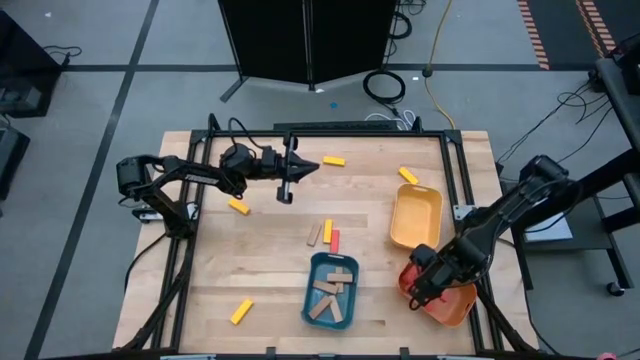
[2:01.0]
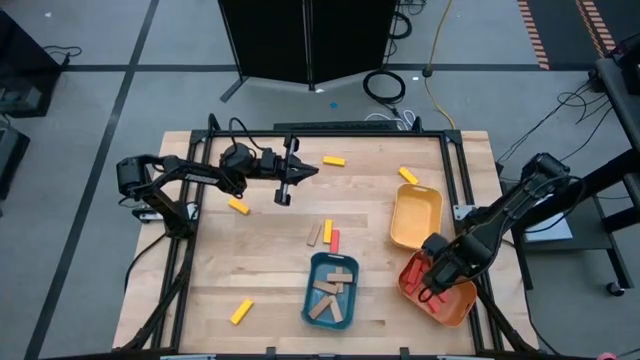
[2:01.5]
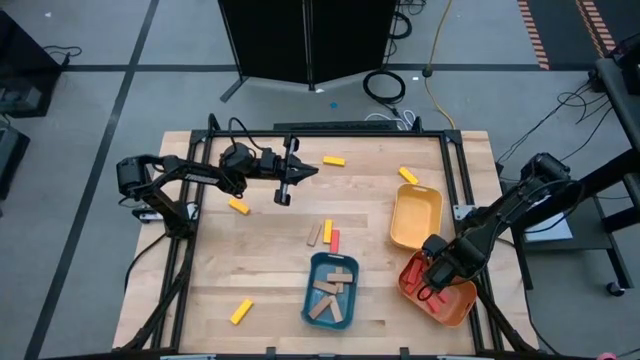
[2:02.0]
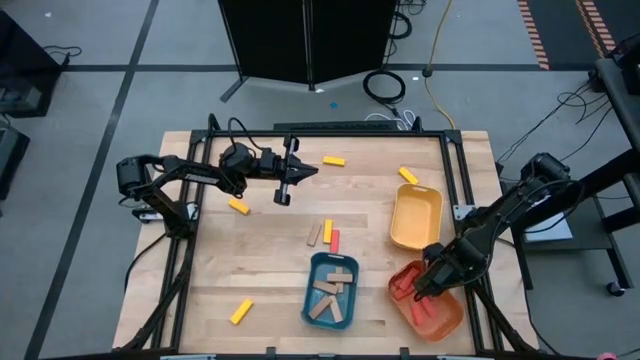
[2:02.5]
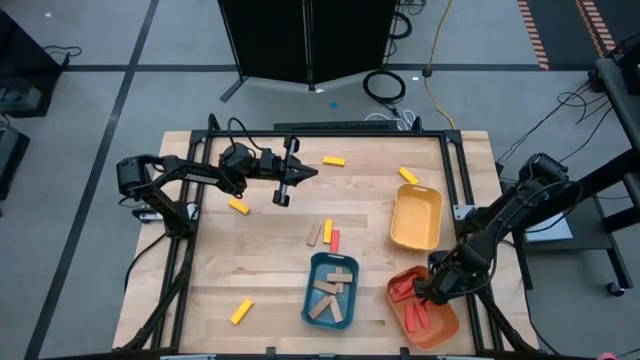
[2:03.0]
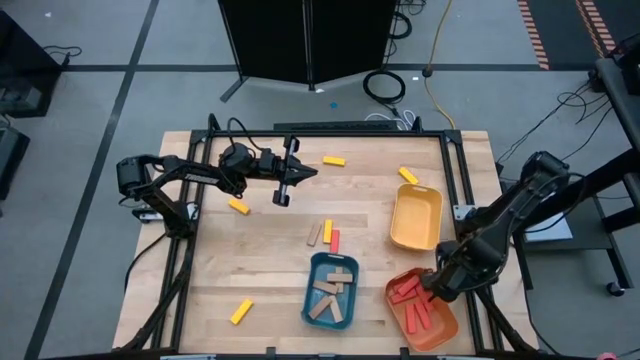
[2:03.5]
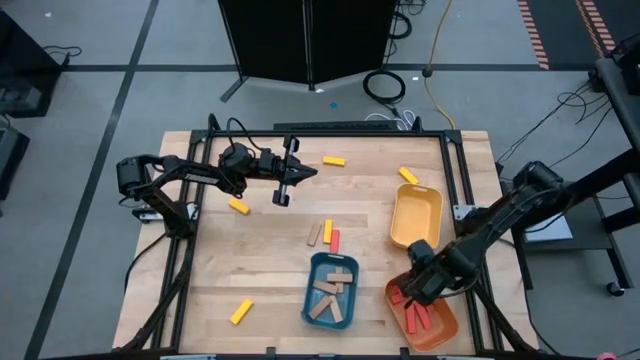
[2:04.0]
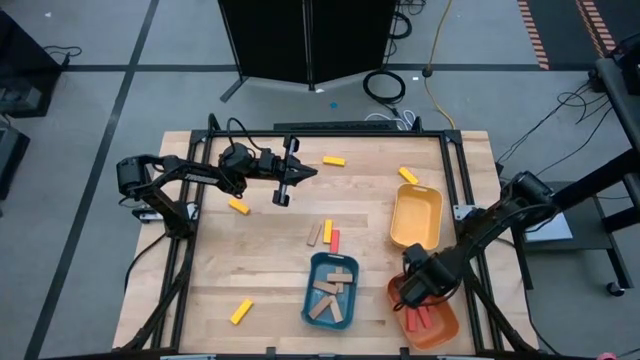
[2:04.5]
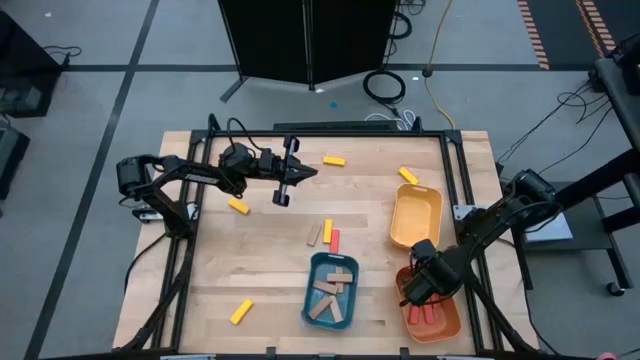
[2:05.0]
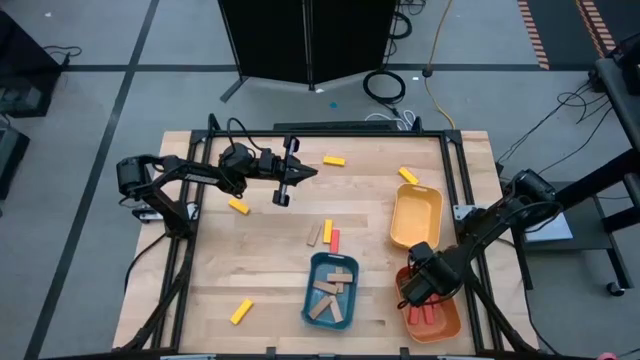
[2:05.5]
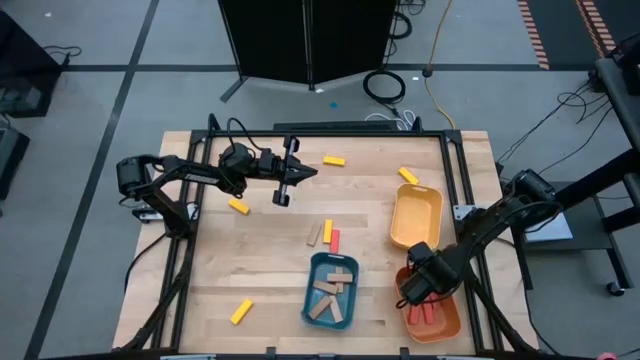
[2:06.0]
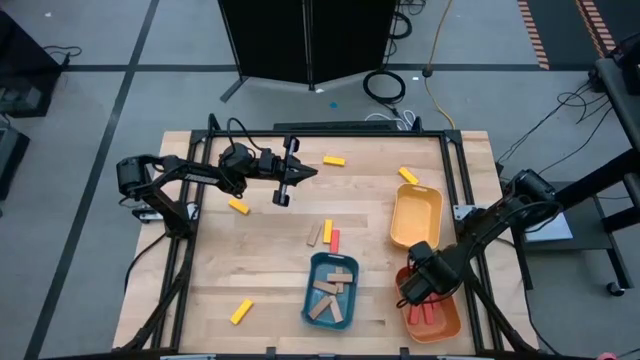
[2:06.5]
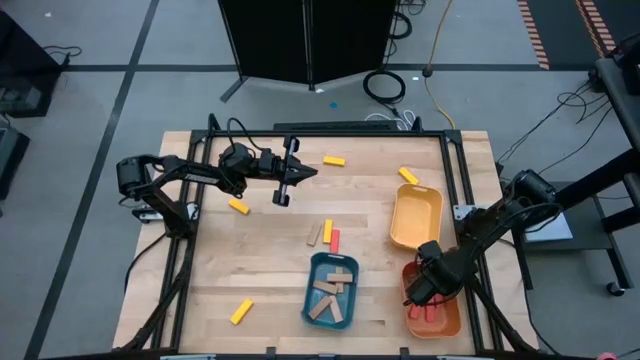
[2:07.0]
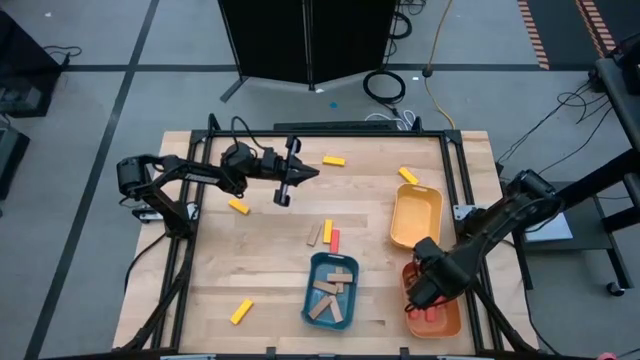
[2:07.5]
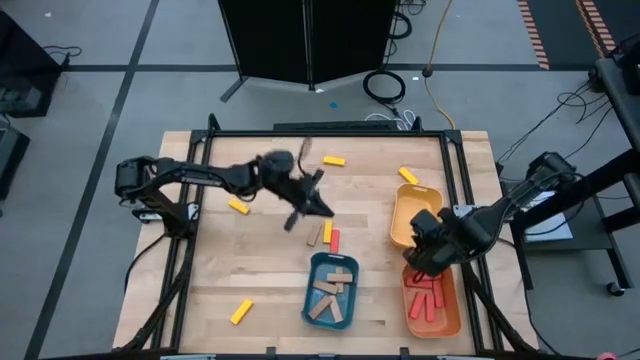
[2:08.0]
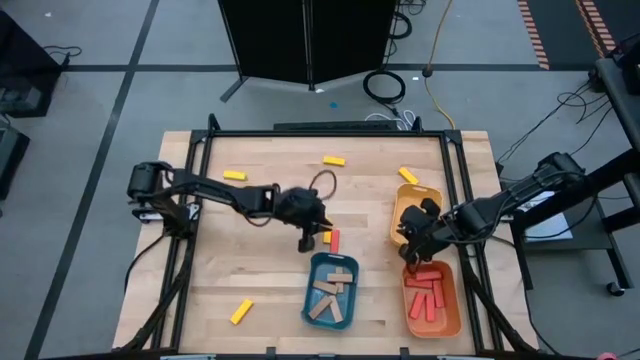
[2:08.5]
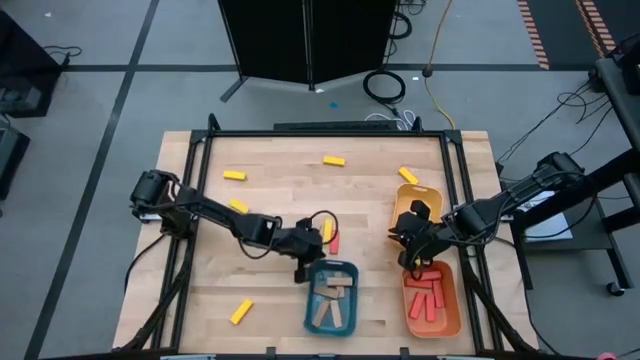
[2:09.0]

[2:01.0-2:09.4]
Task: Sort blocks
Adjust the bins on the table

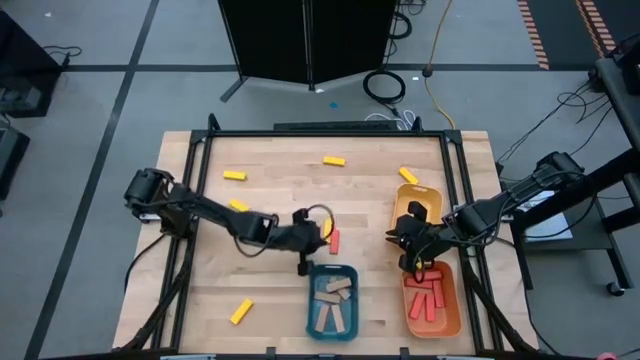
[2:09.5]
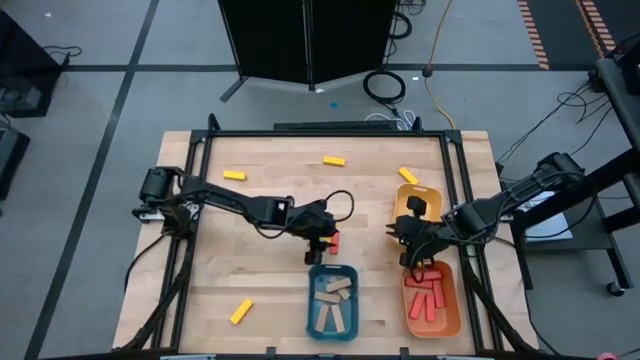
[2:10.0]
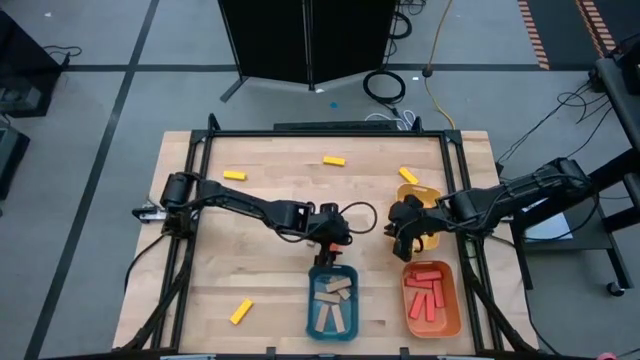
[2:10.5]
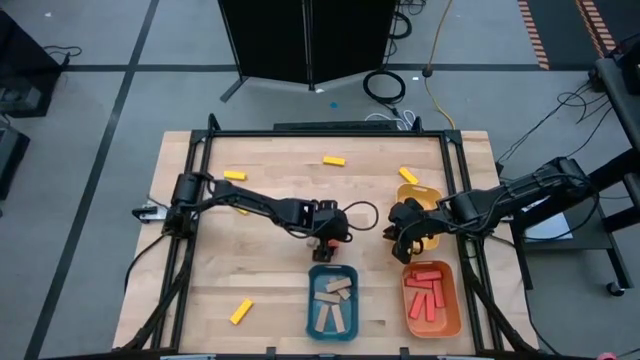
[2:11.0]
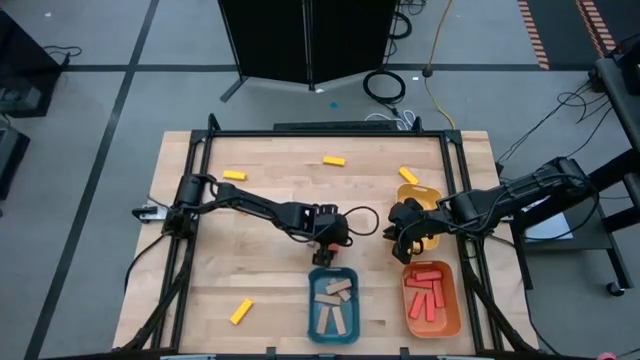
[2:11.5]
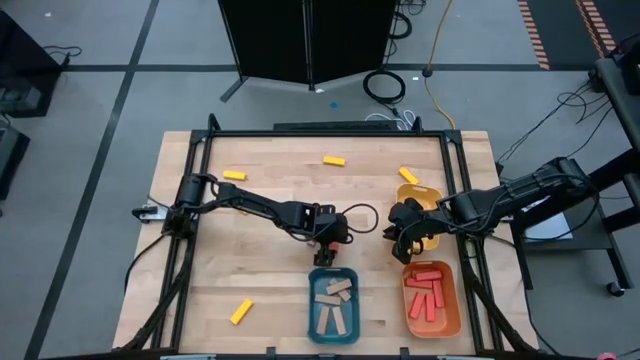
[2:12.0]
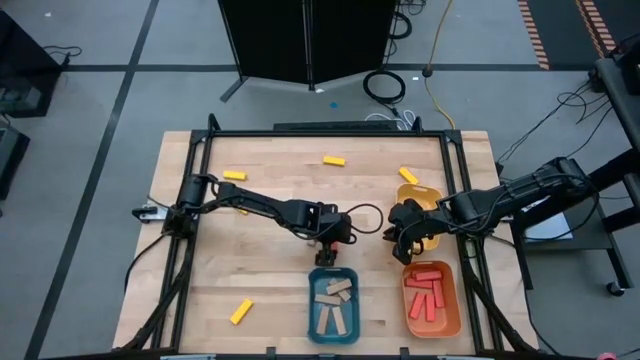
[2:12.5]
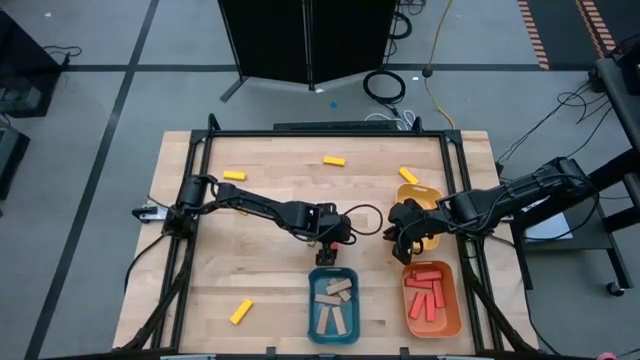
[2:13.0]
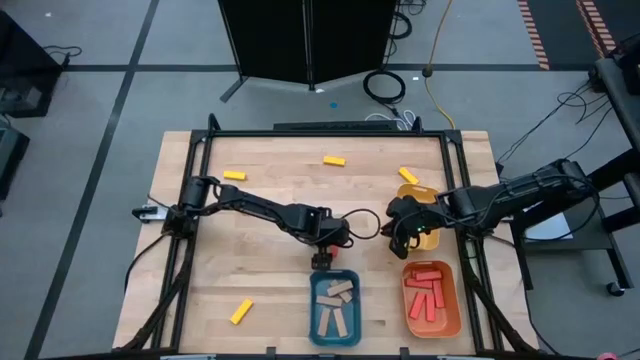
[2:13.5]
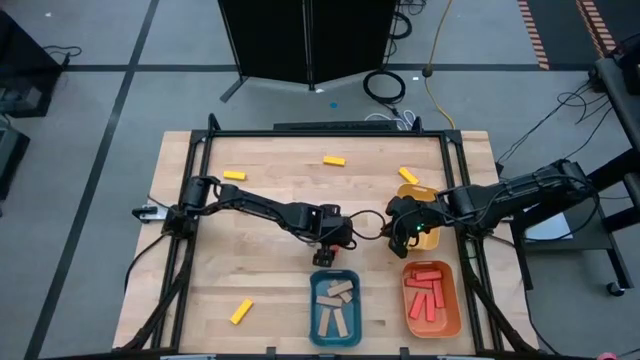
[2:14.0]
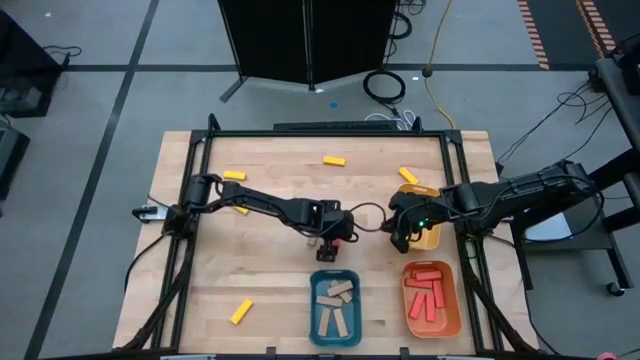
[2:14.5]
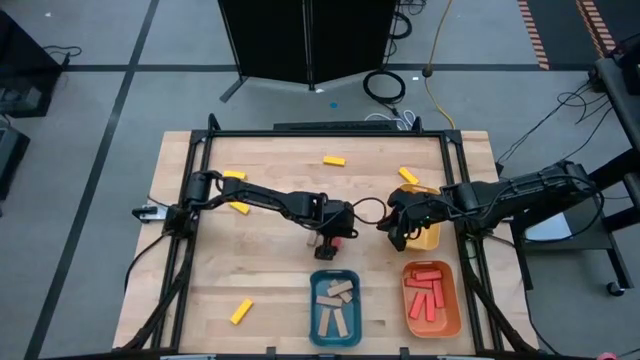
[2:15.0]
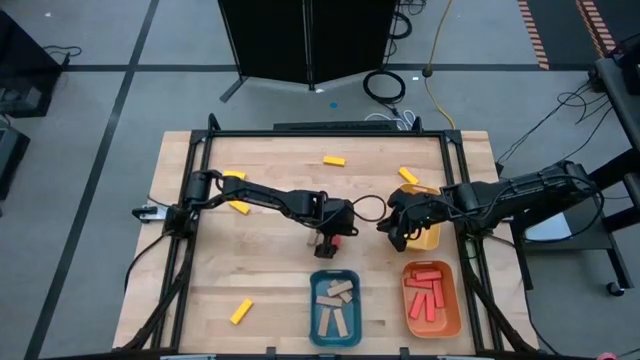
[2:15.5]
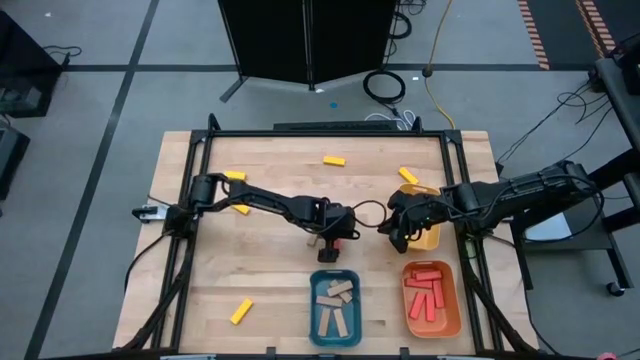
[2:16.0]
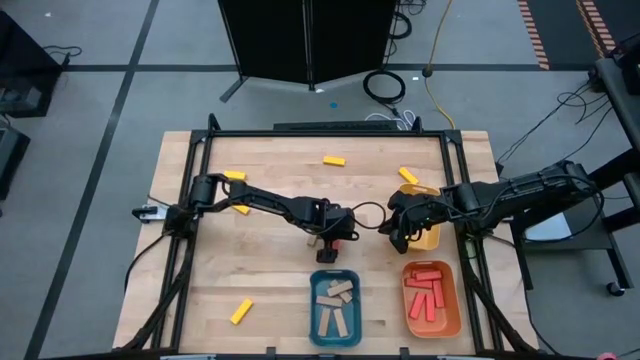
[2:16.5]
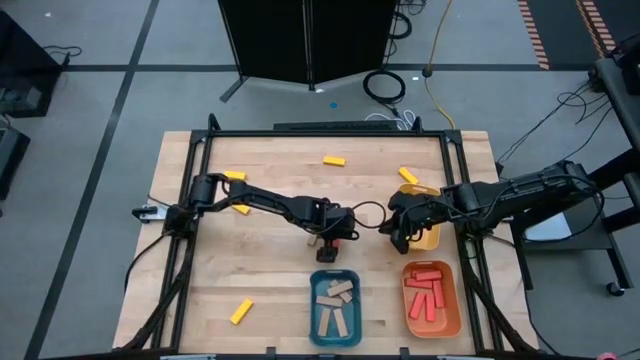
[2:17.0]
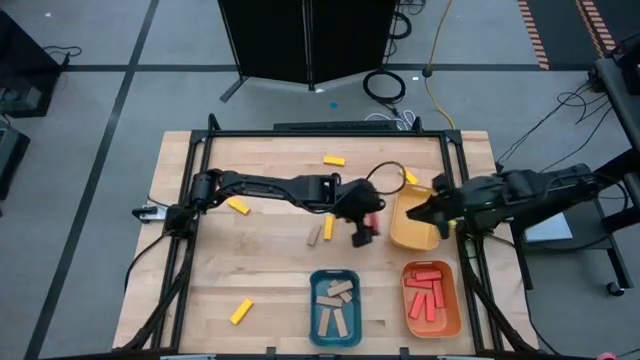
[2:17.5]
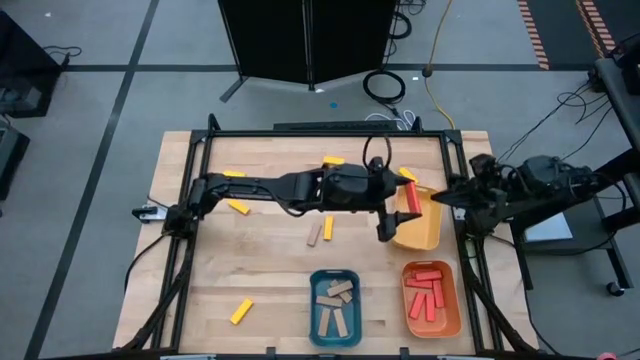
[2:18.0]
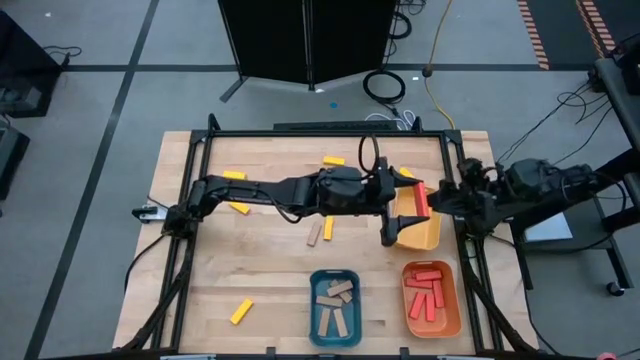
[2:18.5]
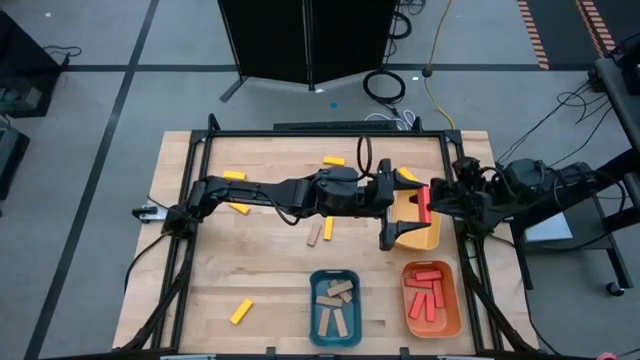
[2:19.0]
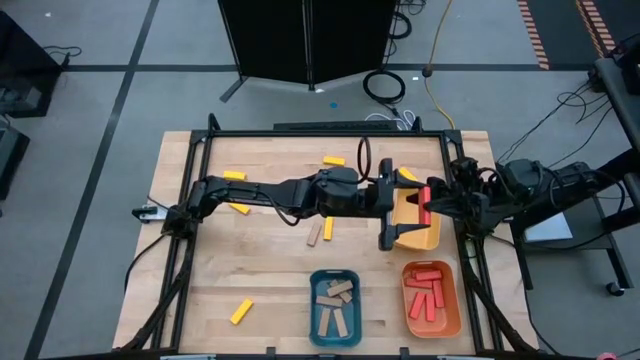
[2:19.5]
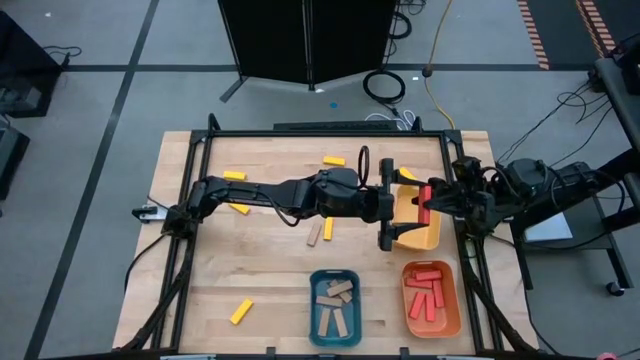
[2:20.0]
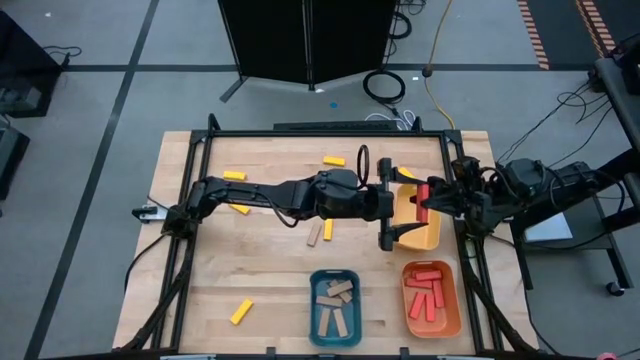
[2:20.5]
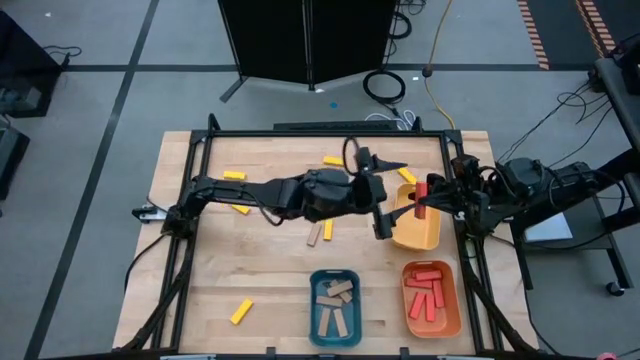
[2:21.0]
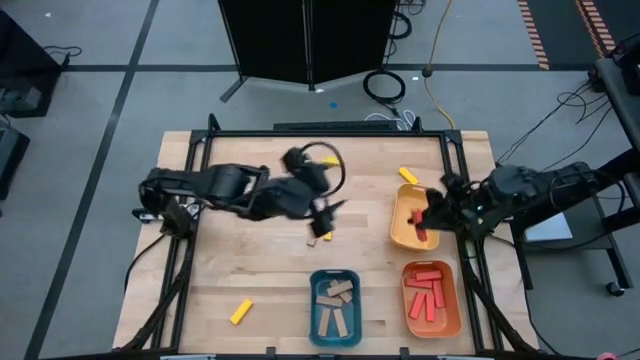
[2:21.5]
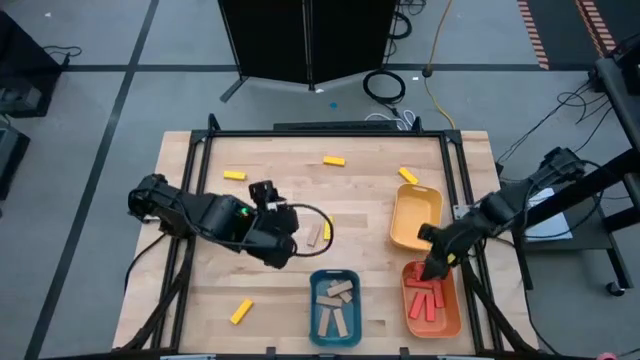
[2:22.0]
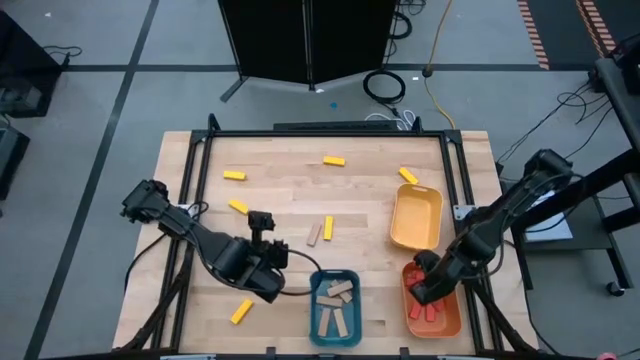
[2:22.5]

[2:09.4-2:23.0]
Put the orange block into the orange bin
